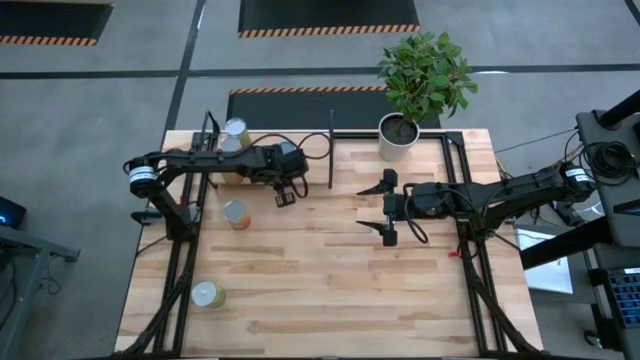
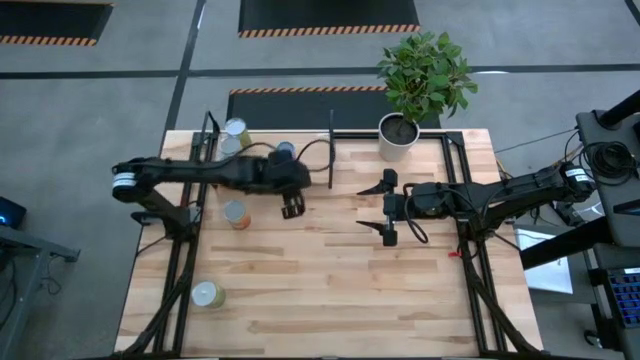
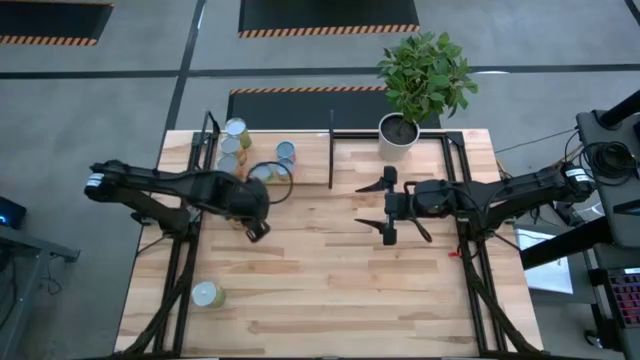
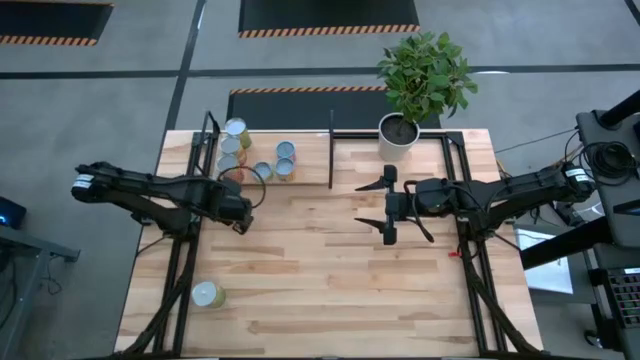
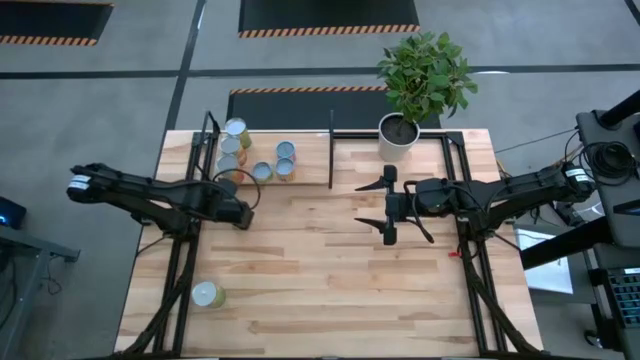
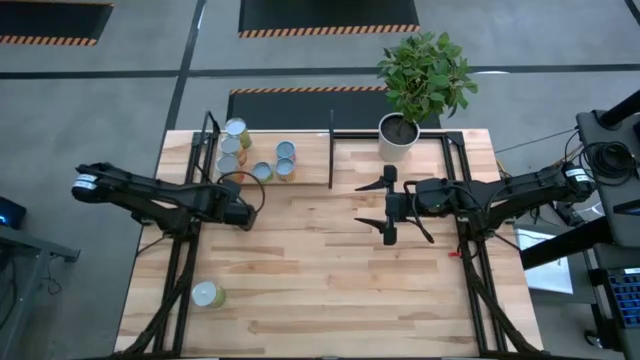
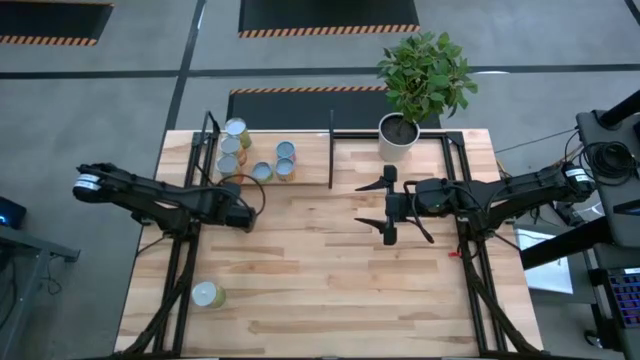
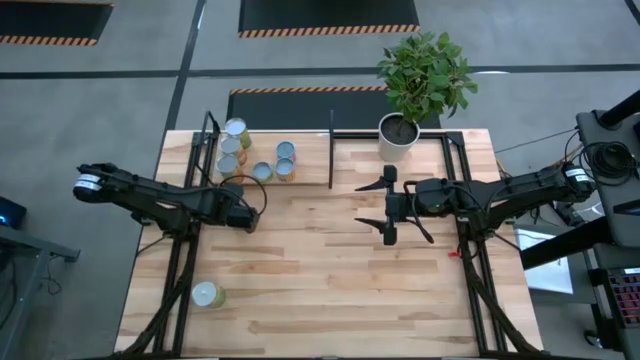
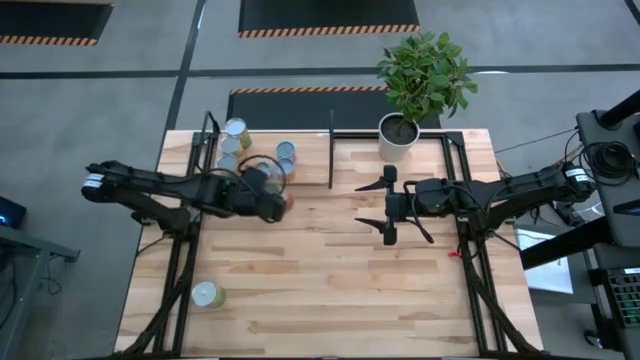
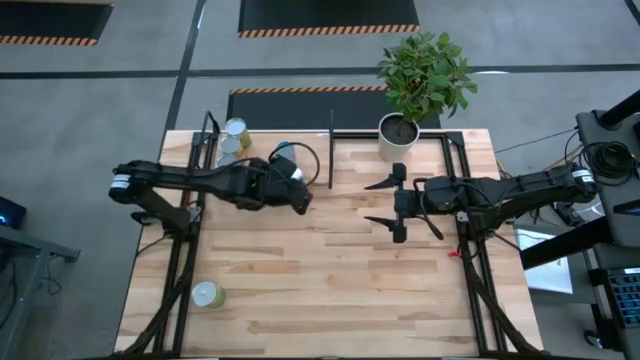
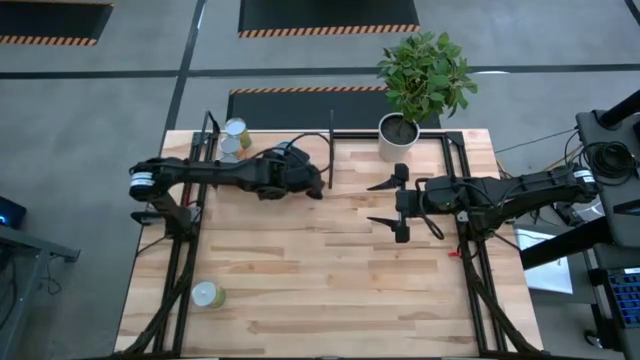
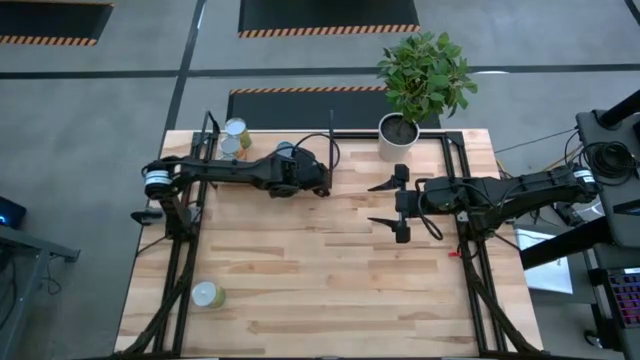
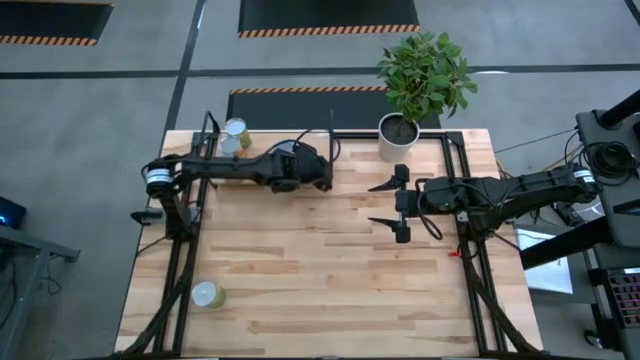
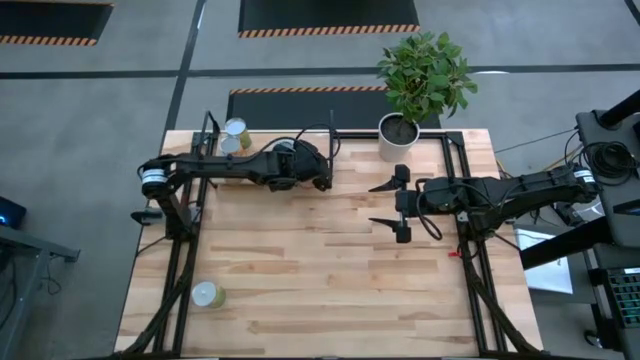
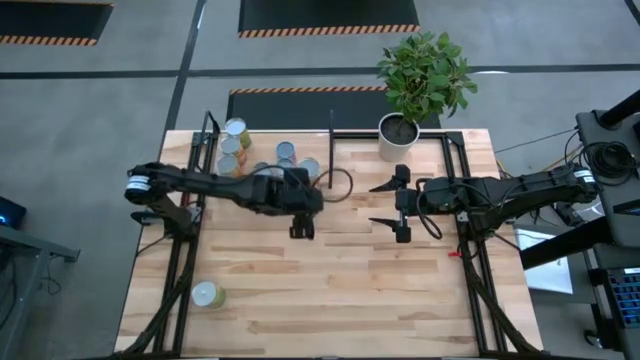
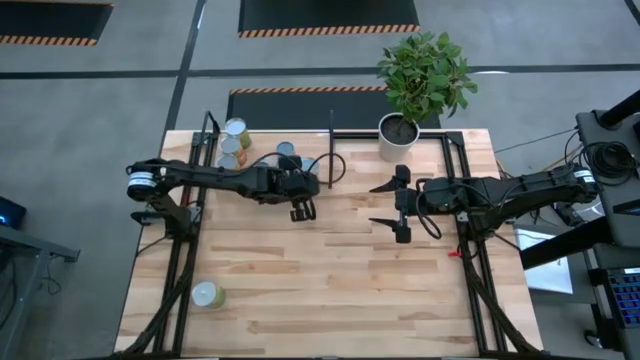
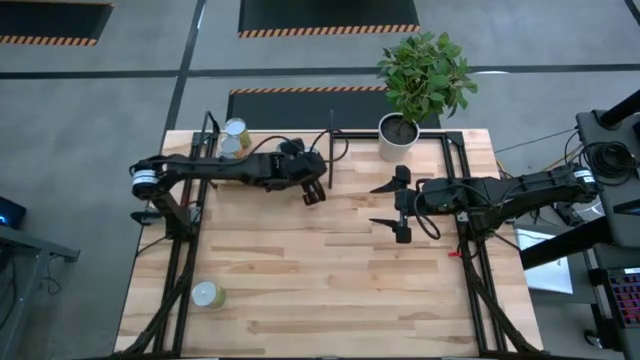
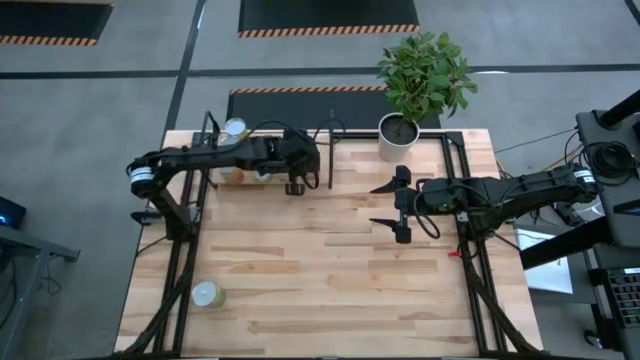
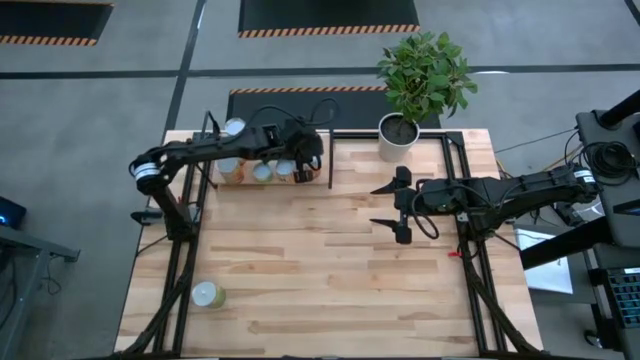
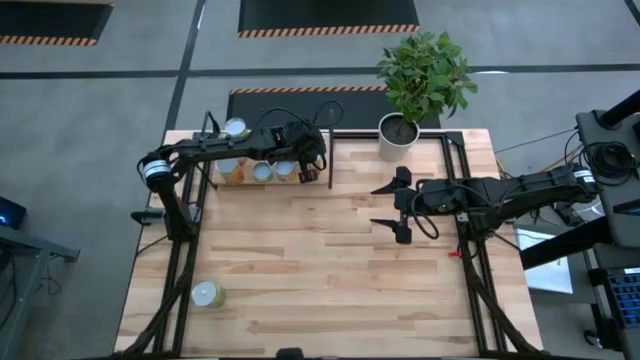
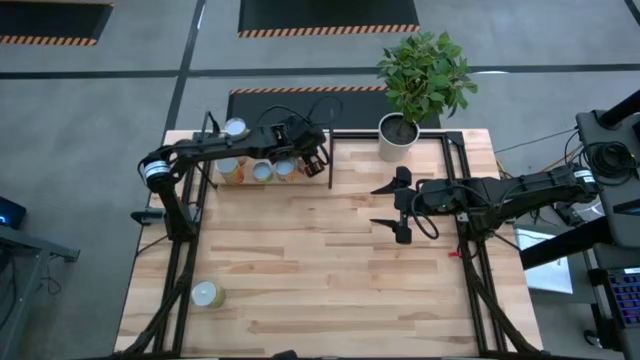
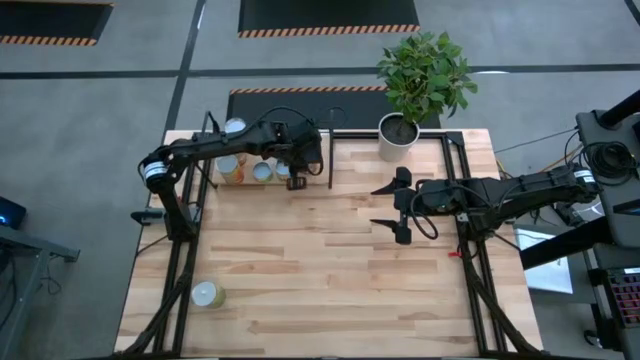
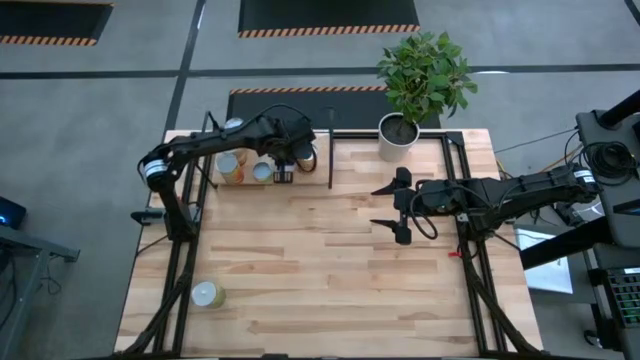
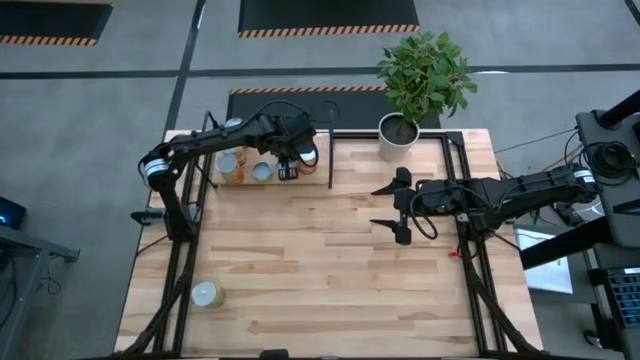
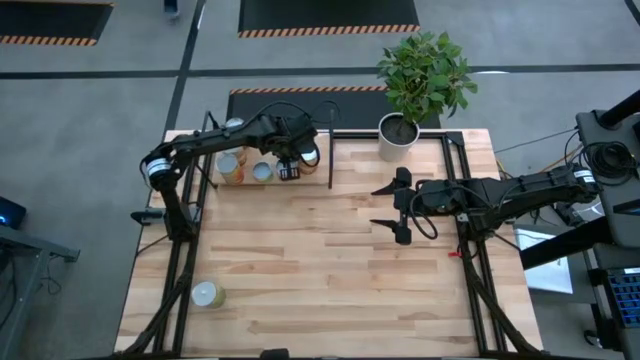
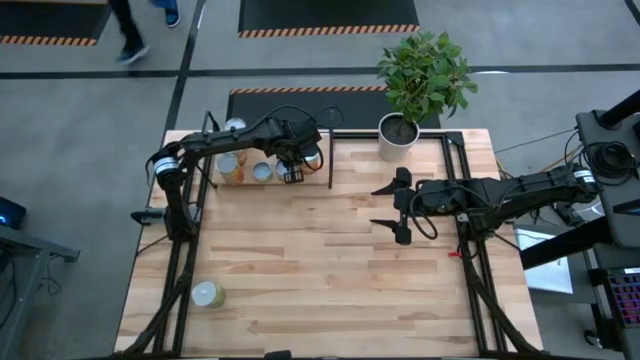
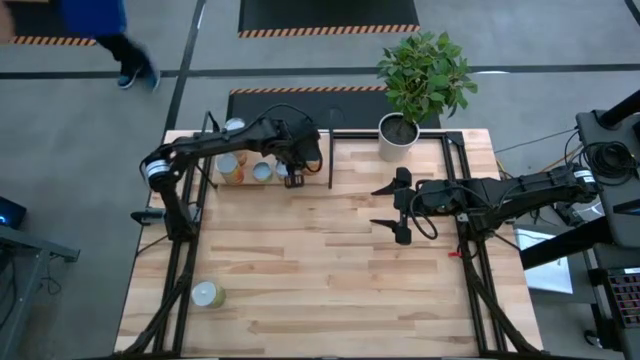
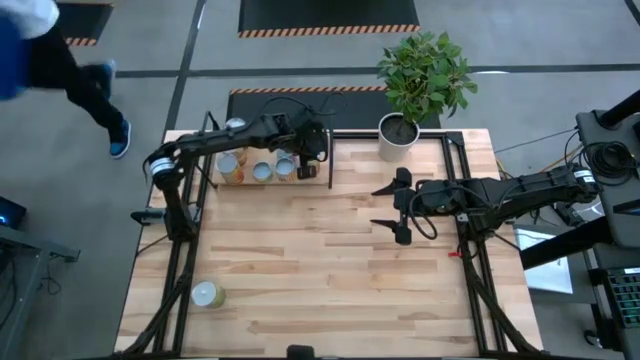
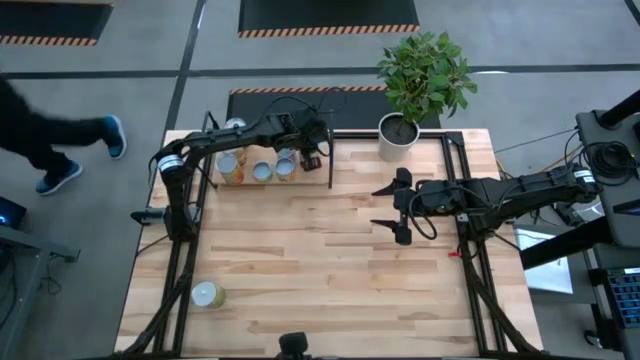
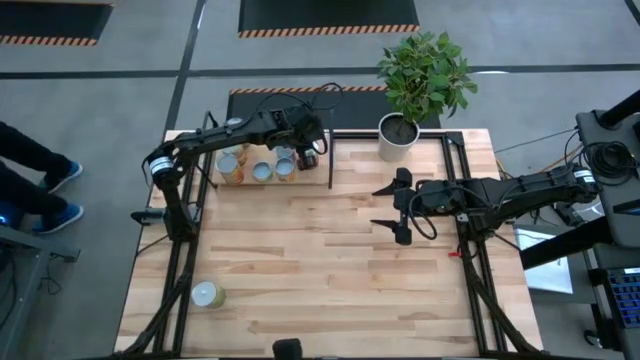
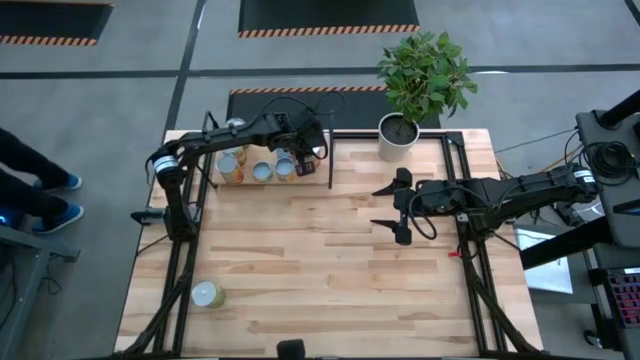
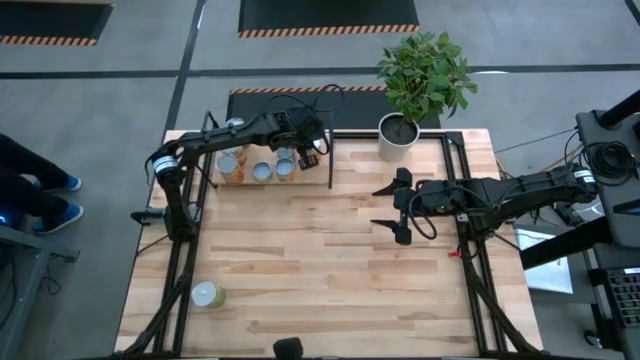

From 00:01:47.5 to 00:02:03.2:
Task: Pick and place cans onto a shelf
Put the orange corn can on the shelf

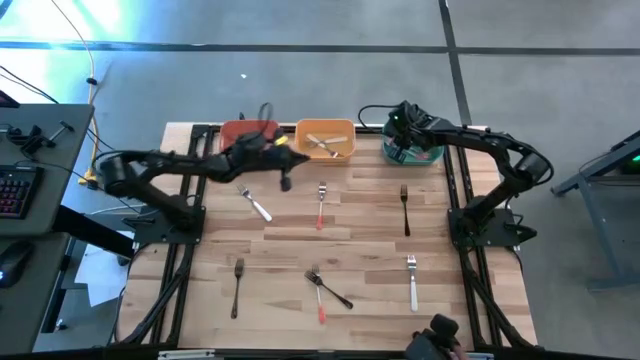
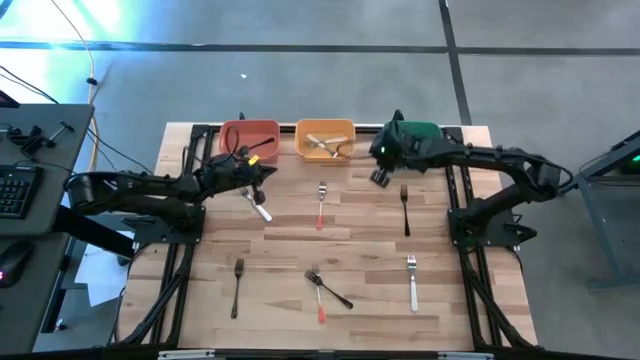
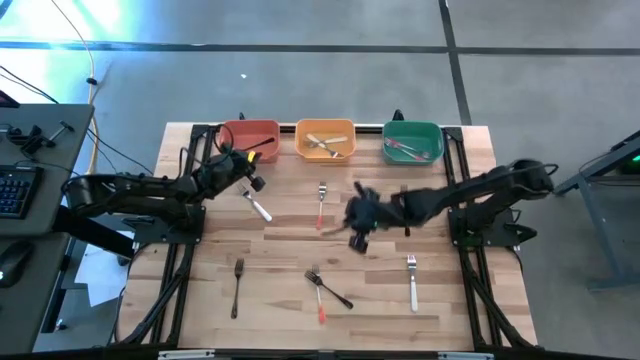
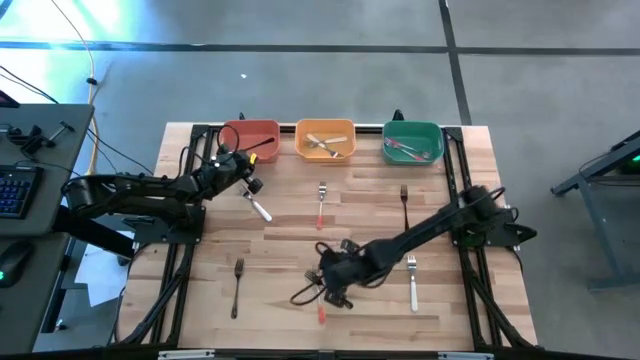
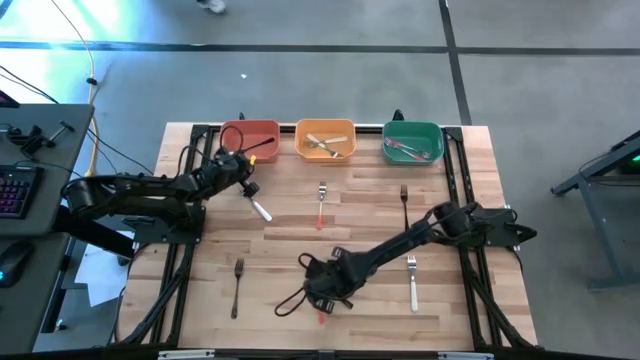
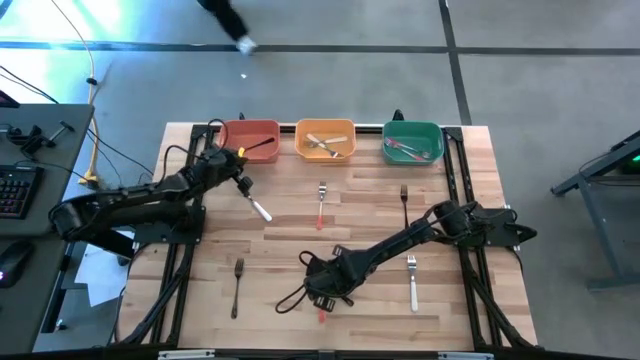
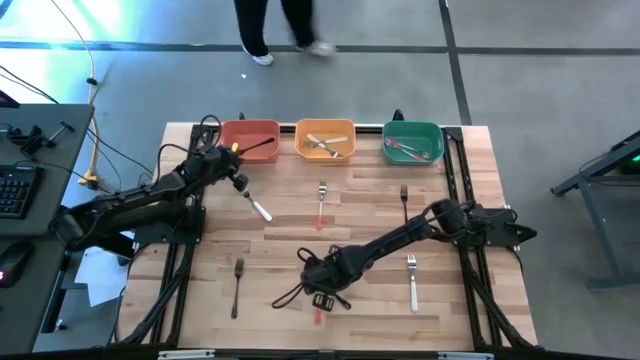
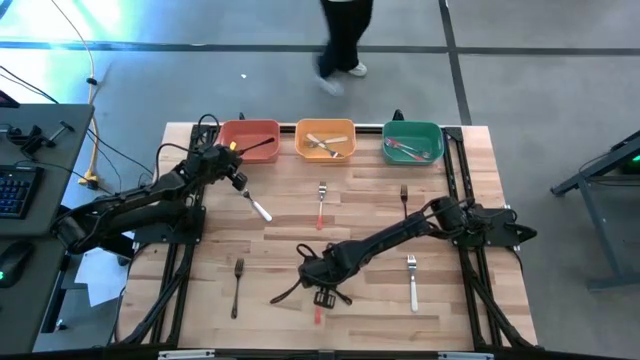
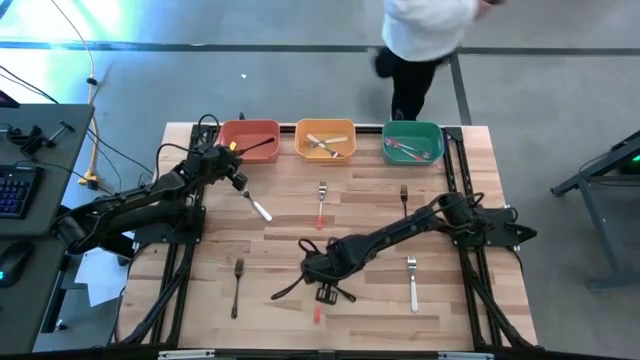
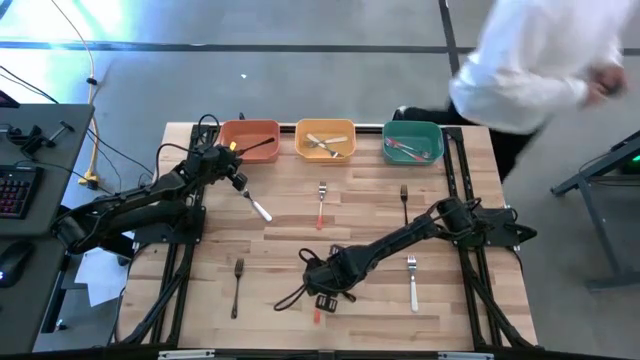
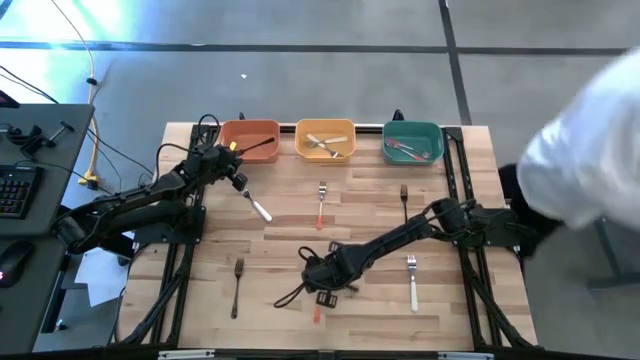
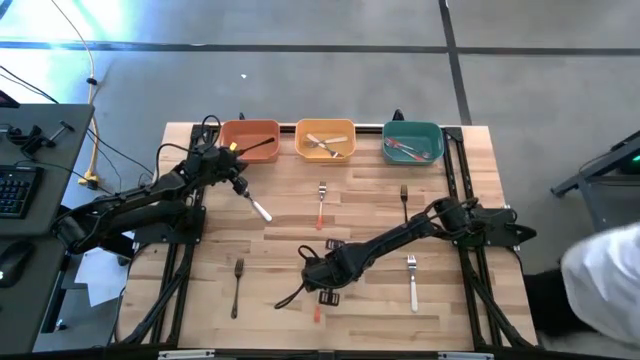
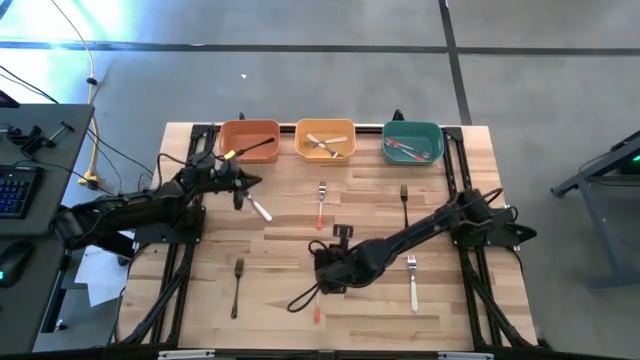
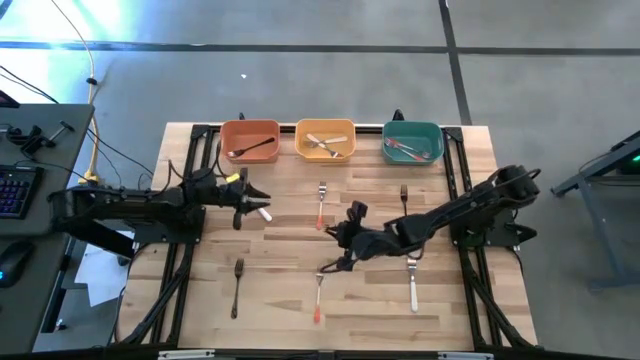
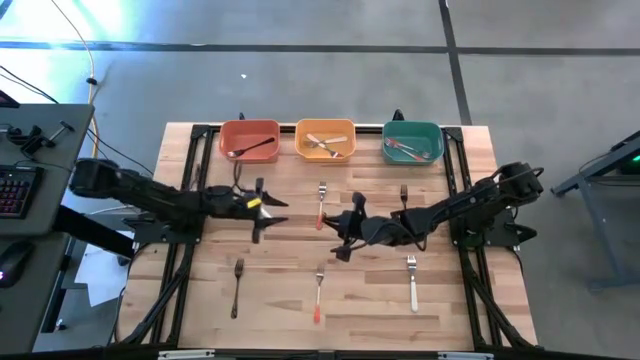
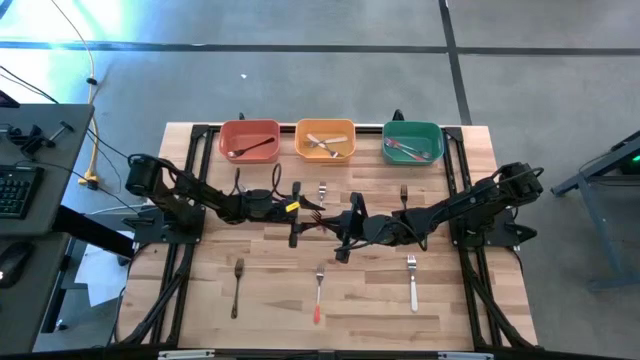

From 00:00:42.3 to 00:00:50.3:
Task: Sort silverware by color (type)
Put the bottom right black fork into the orange bin
